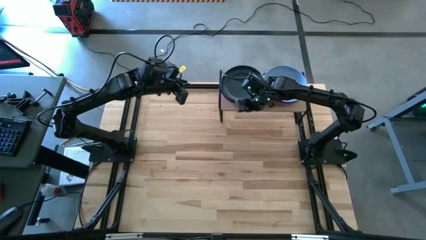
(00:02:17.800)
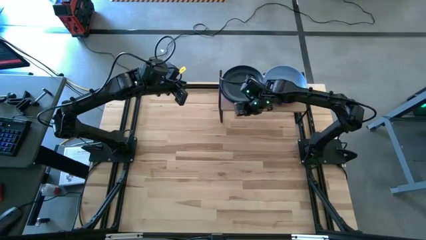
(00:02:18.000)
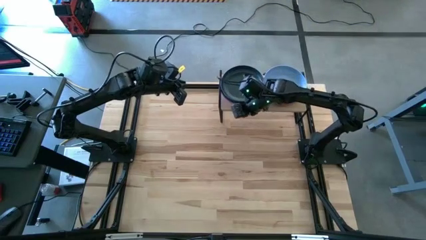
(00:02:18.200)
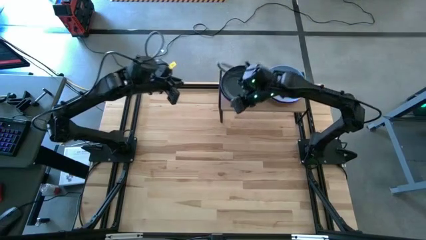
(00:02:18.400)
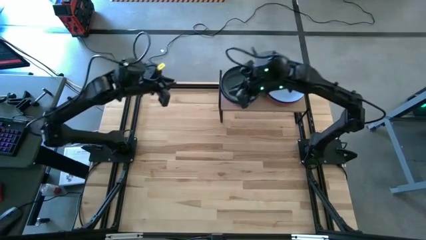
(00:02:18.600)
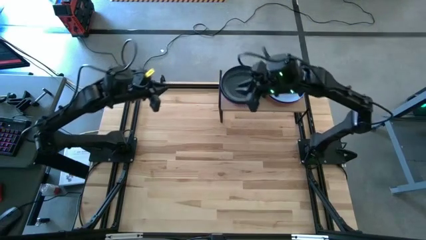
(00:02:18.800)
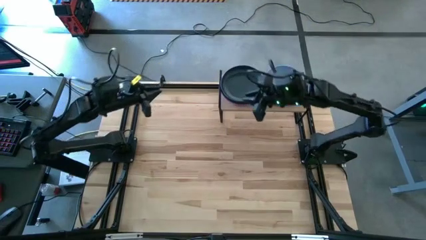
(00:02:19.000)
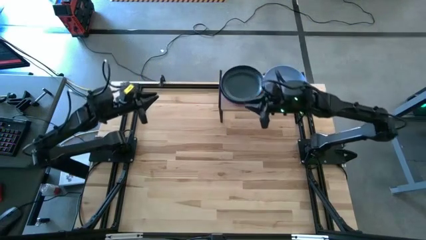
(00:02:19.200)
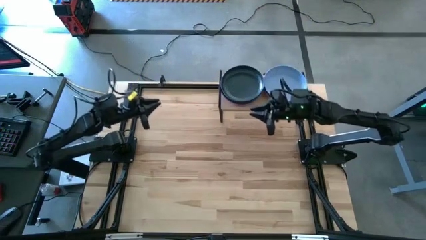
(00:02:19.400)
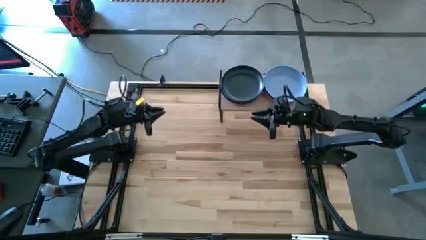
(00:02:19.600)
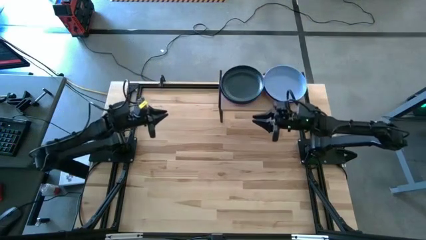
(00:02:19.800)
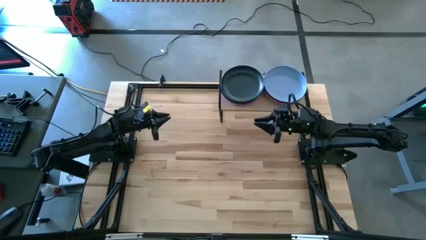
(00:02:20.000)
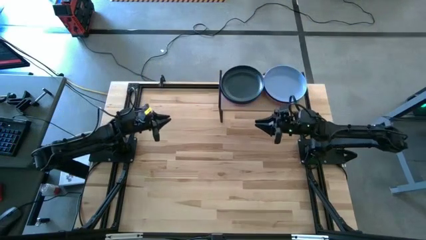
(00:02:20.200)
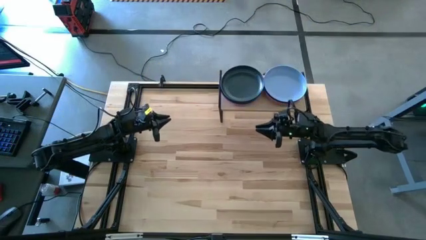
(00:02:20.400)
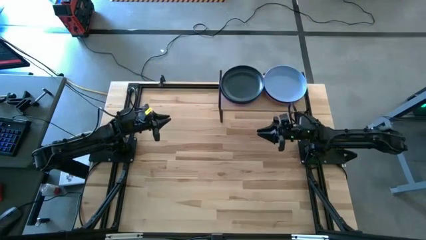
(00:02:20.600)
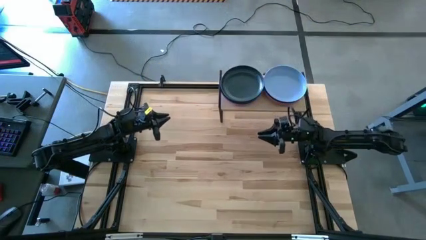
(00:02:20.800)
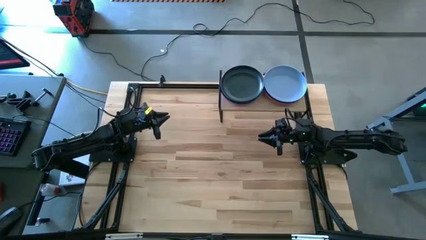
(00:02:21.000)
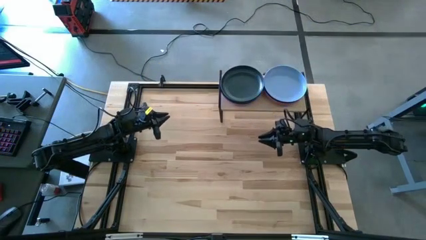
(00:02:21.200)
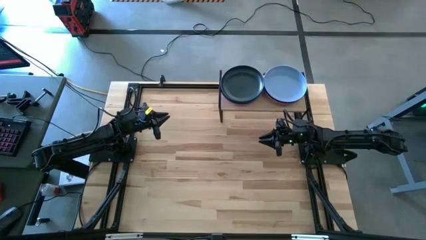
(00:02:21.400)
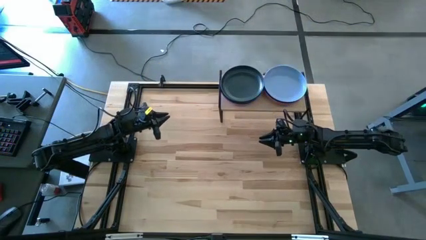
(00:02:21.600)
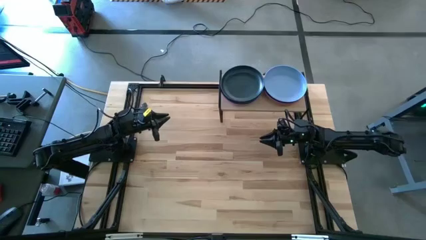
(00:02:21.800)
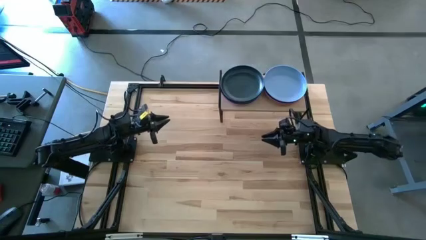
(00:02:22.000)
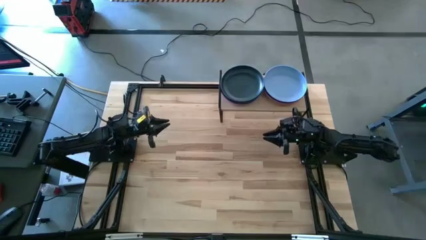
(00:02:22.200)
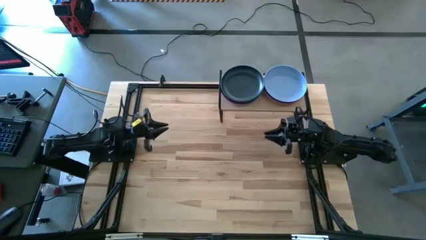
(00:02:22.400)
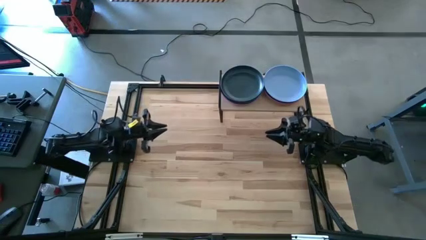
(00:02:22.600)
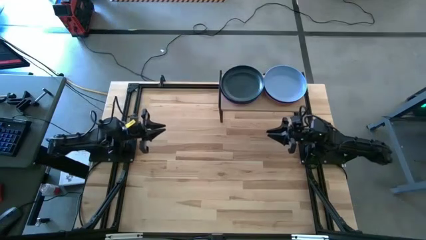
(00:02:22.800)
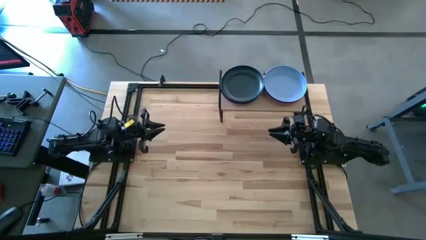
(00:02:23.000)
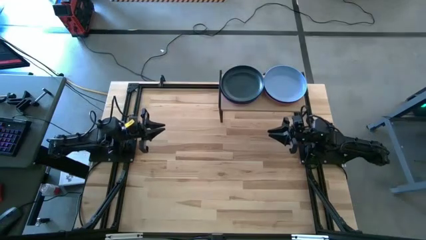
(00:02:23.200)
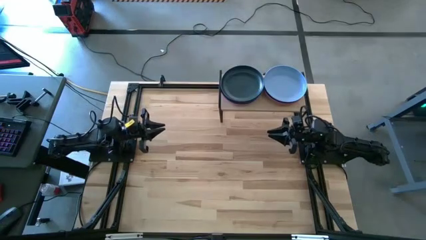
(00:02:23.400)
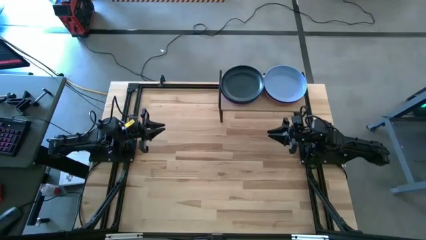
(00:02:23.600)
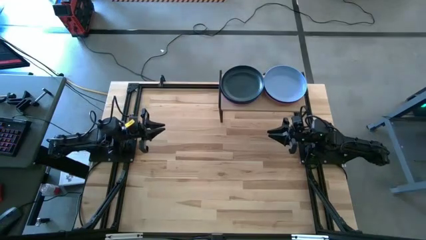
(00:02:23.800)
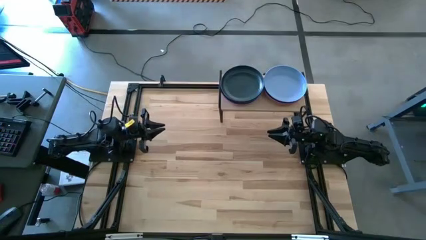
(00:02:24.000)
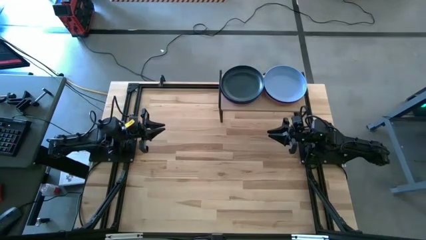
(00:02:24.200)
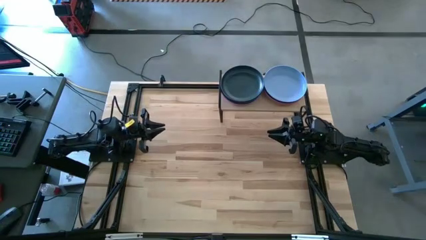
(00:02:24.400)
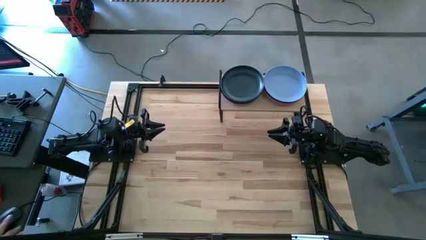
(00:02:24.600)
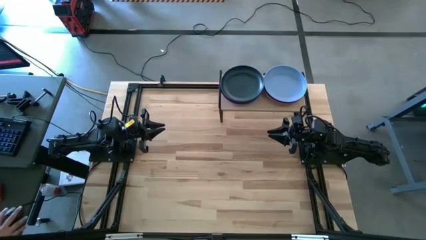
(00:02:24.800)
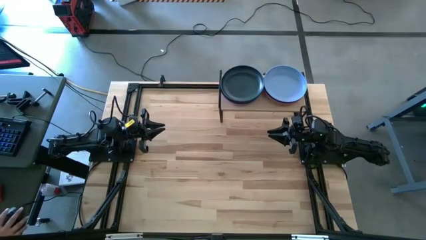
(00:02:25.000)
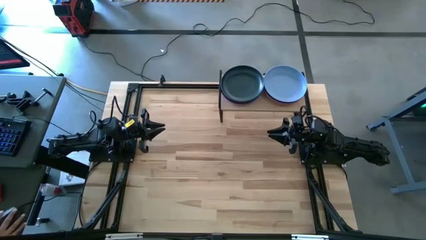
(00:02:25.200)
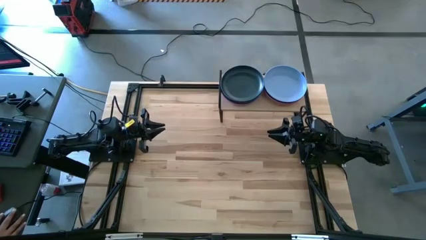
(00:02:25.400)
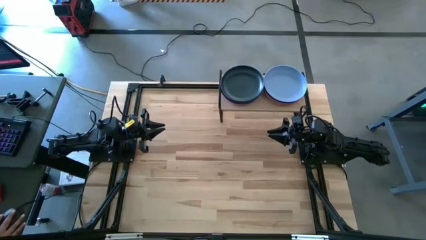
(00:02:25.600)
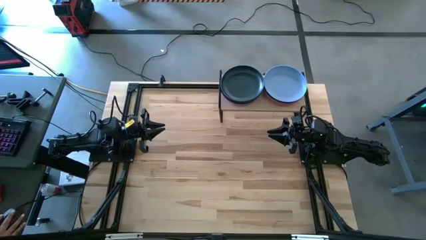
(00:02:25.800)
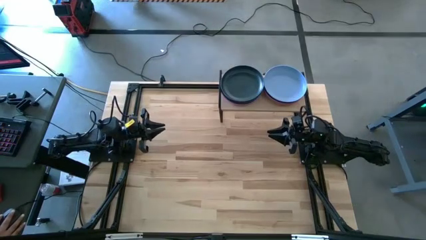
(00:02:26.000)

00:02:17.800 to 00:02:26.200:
Task: Place and stack plates onto a shelf
Return to Home Position

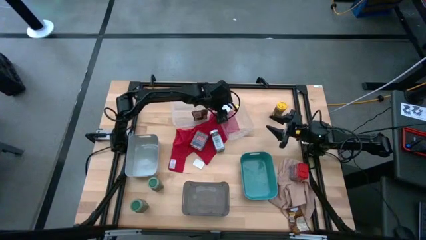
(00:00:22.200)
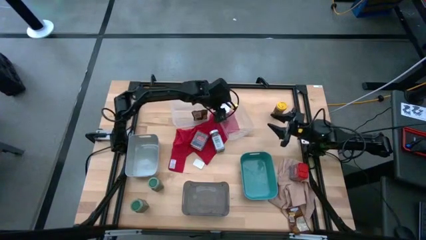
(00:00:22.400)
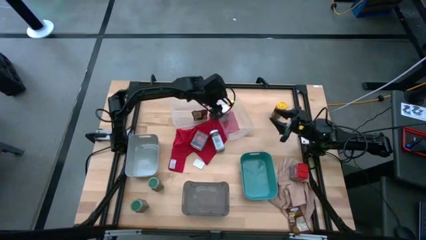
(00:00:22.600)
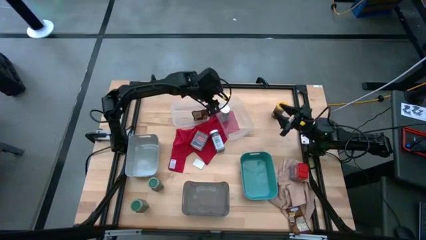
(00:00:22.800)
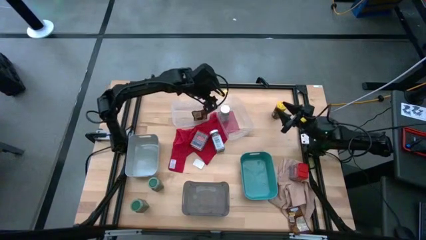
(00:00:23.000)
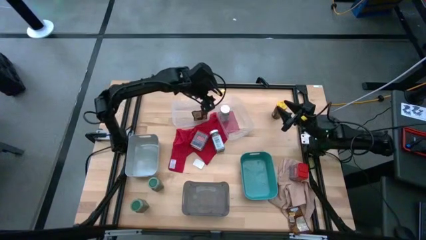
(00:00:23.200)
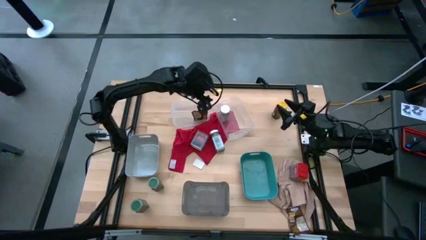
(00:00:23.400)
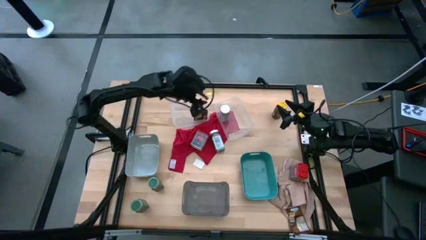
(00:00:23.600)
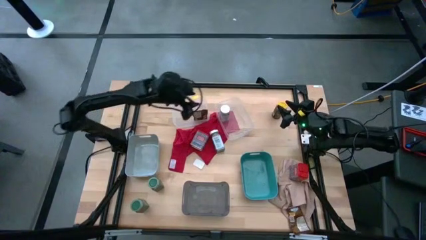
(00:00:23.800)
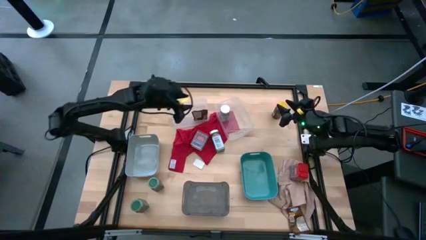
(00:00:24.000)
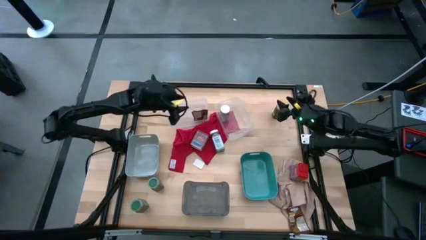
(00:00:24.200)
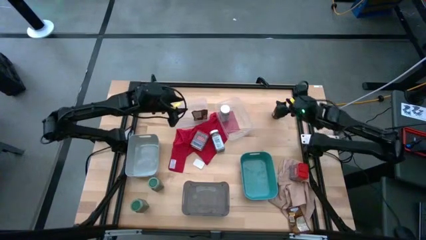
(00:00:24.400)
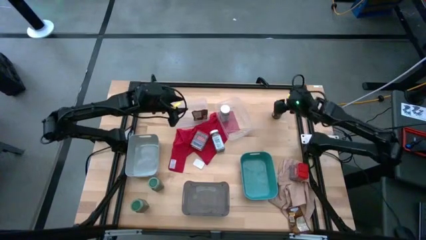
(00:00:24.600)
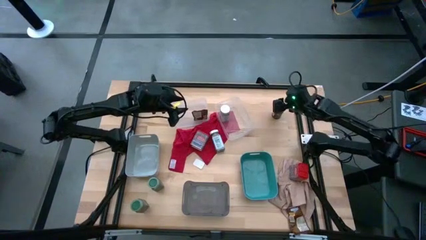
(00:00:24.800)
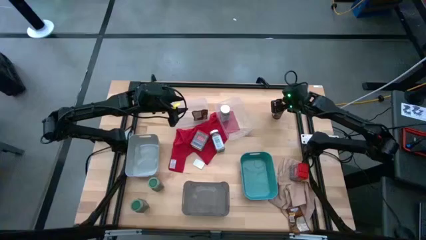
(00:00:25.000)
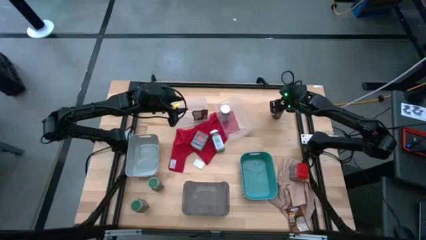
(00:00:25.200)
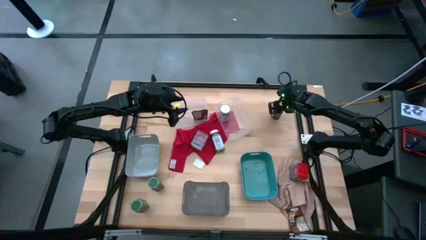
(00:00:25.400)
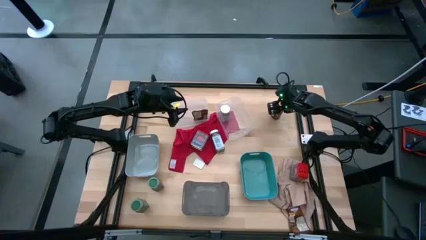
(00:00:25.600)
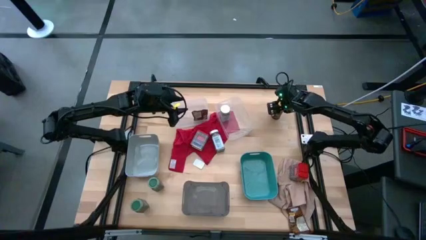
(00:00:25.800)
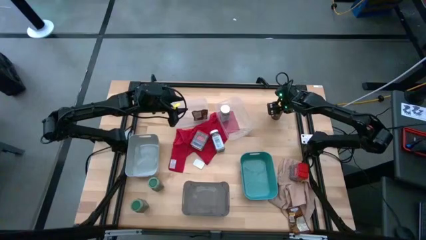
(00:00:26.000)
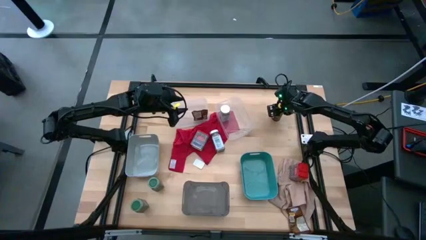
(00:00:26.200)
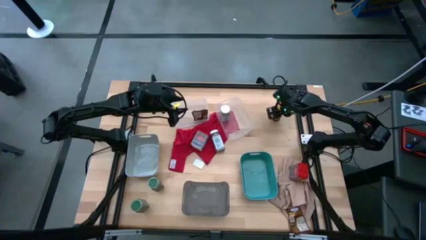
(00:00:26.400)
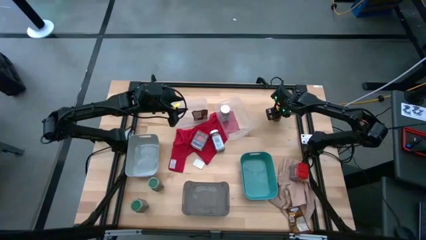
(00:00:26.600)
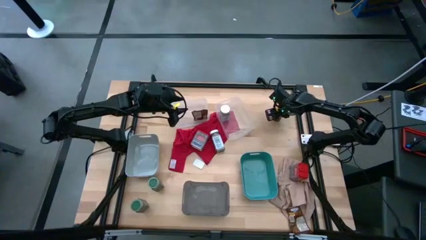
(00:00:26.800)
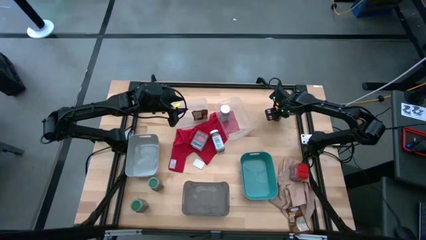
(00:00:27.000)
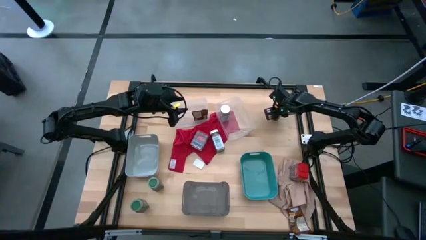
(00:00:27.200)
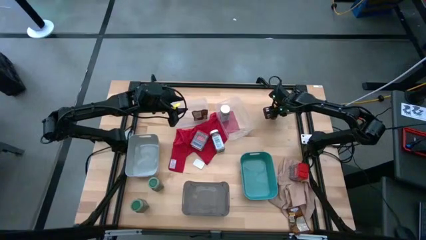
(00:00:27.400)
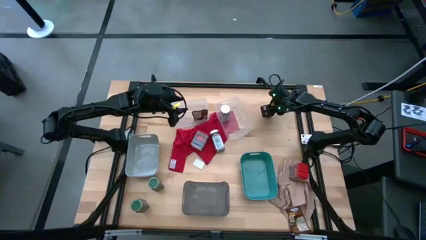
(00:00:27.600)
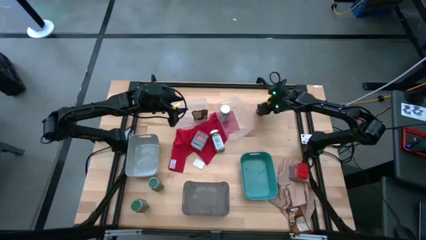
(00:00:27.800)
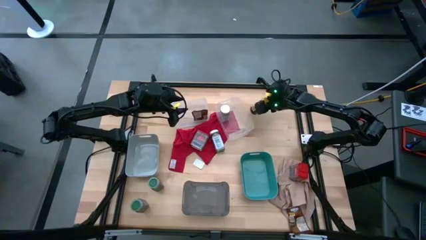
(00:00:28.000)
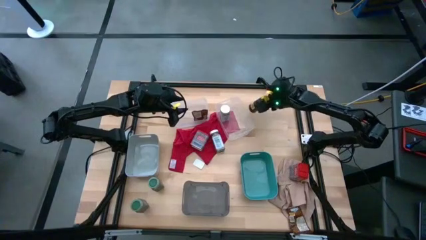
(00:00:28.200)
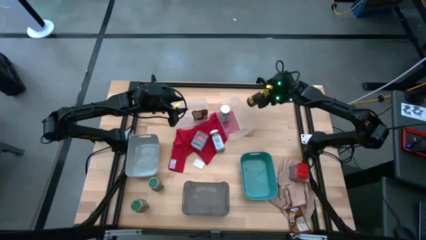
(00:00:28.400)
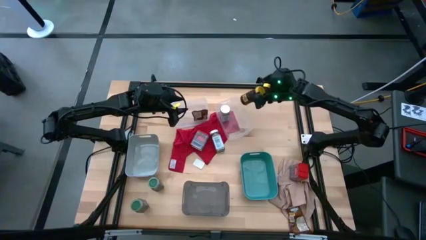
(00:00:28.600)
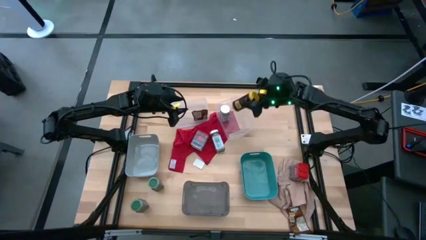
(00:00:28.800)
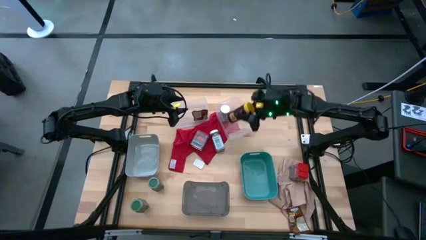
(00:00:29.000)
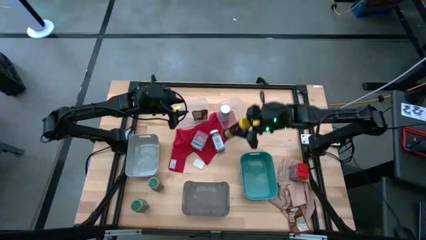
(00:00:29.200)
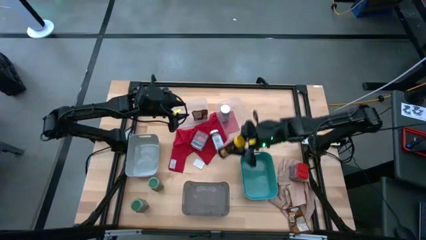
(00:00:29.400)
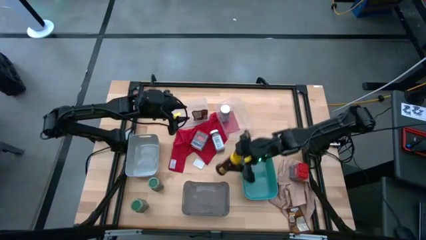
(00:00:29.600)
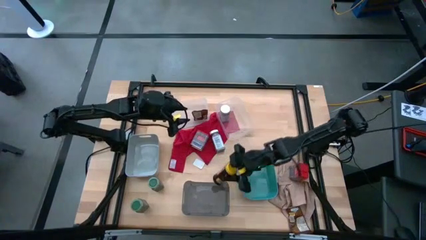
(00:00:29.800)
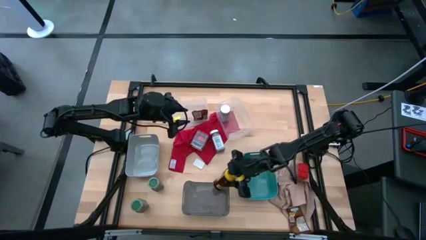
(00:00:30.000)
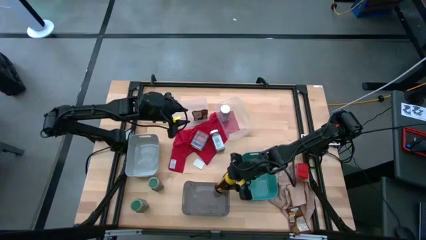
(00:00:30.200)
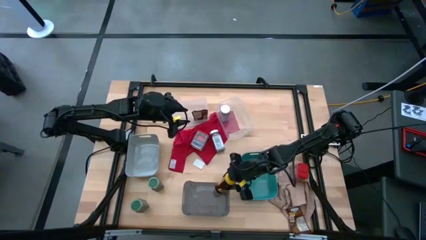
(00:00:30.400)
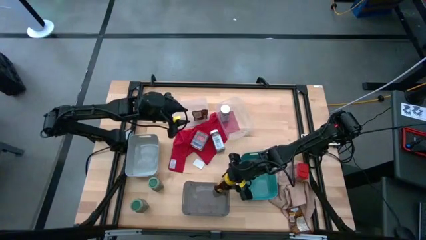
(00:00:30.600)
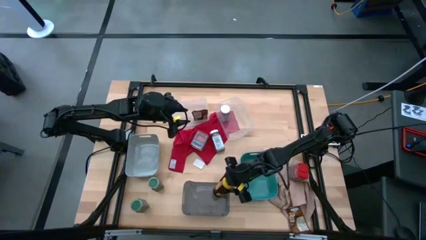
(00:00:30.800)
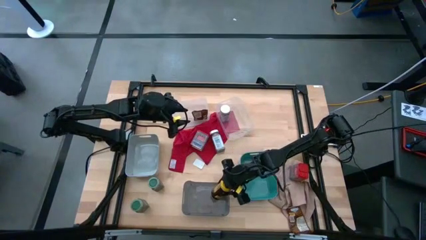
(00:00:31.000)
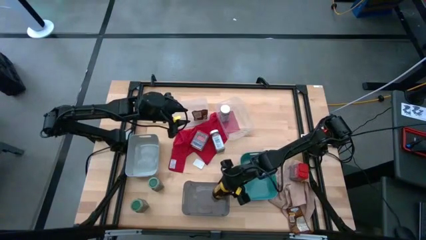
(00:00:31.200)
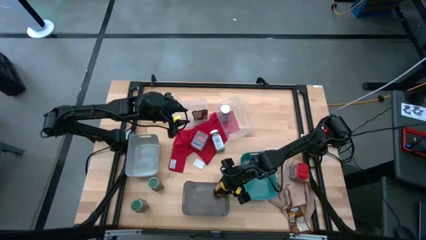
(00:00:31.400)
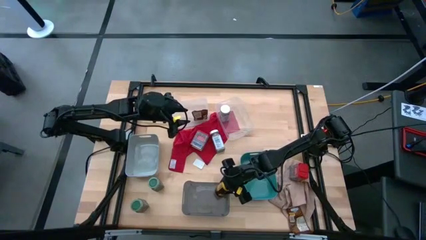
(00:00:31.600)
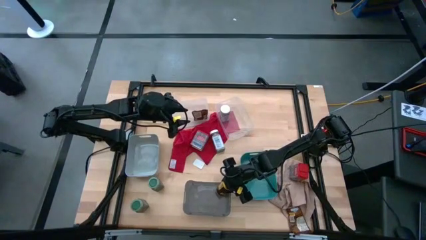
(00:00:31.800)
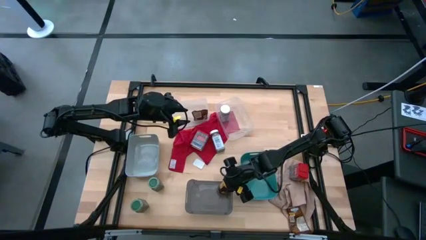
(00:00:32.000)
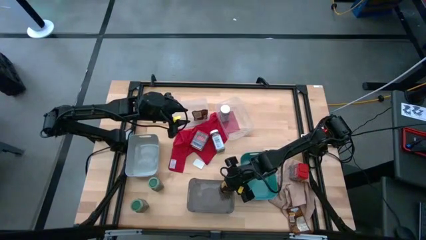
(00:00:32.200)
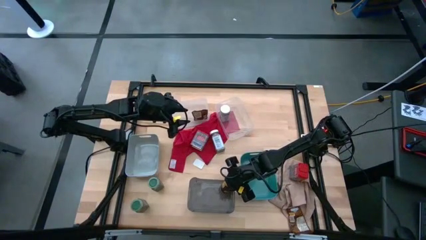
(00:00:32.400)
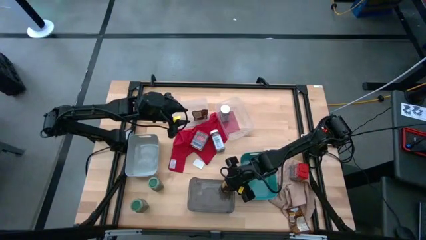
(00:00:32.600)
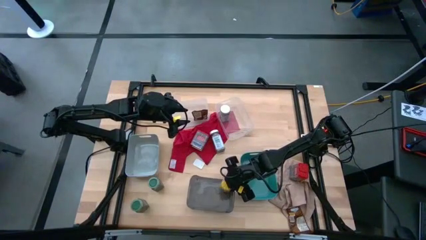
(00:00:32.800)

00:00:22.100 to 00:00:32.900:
Task: Sort spices by type
Put the yellow seasoning bottle into the black transparent bin
